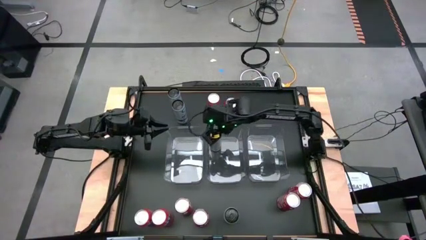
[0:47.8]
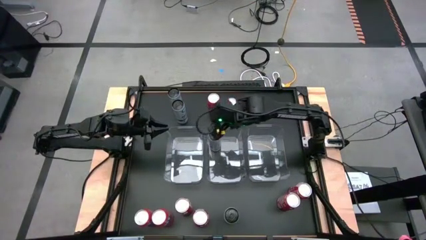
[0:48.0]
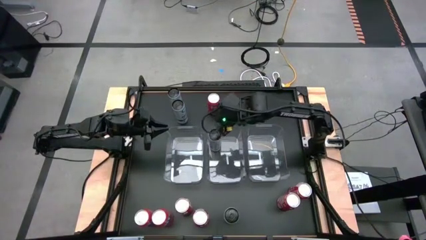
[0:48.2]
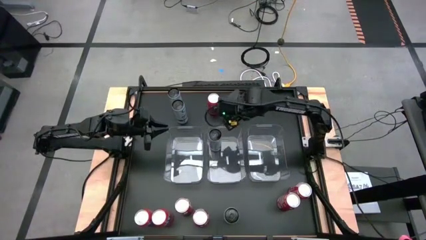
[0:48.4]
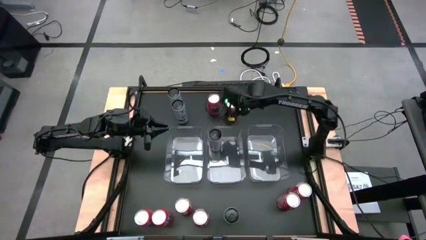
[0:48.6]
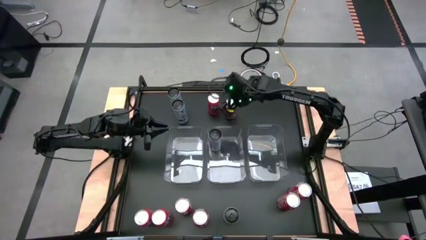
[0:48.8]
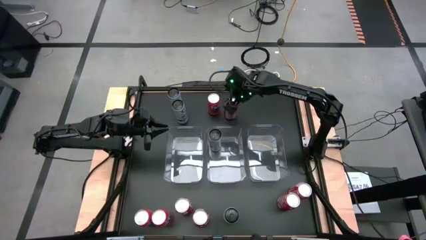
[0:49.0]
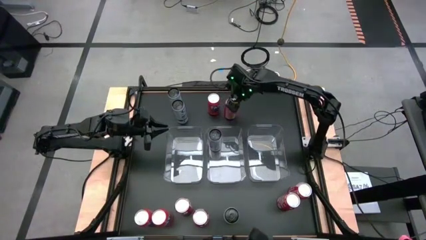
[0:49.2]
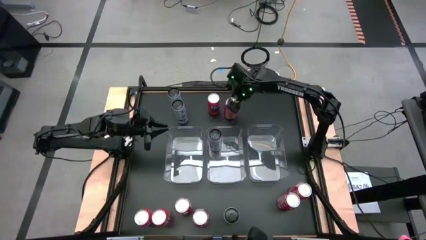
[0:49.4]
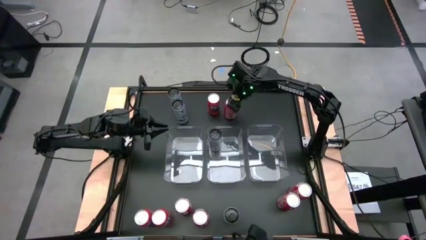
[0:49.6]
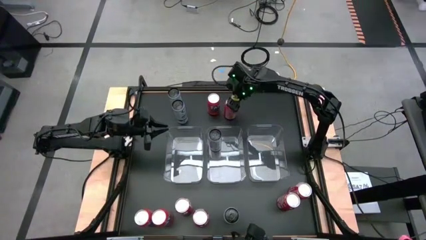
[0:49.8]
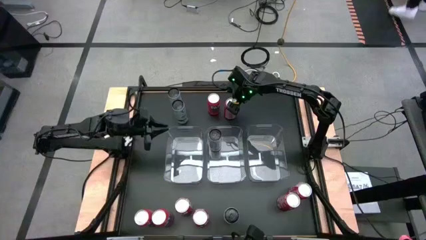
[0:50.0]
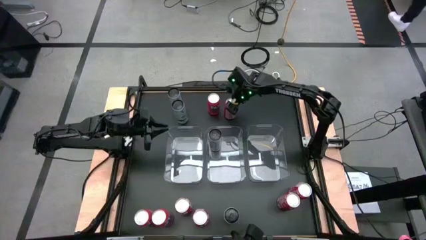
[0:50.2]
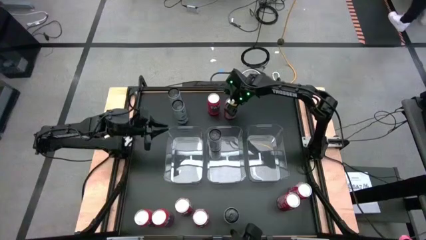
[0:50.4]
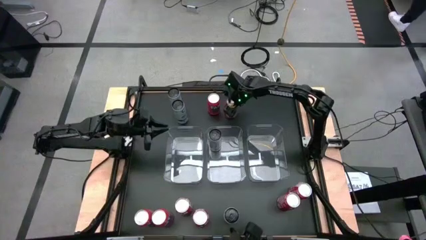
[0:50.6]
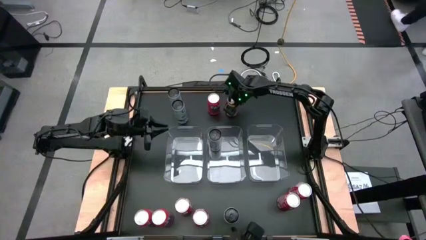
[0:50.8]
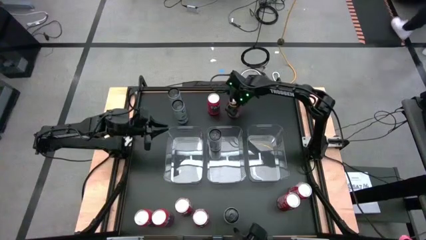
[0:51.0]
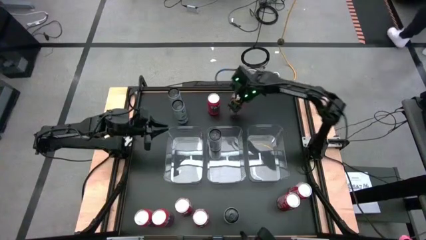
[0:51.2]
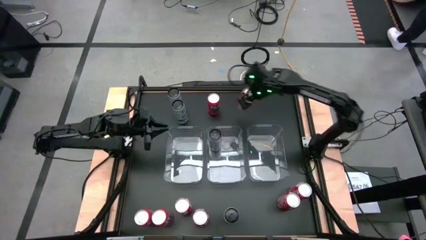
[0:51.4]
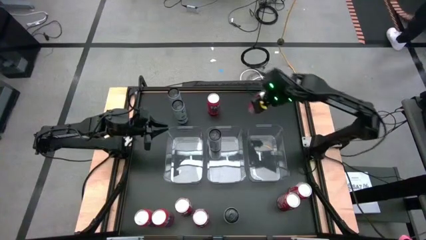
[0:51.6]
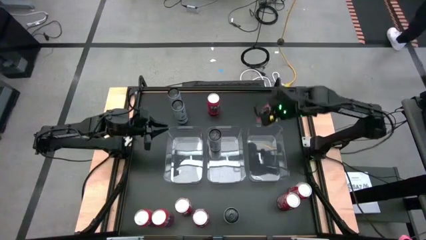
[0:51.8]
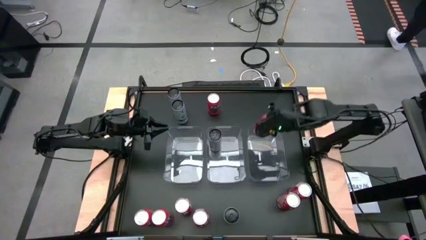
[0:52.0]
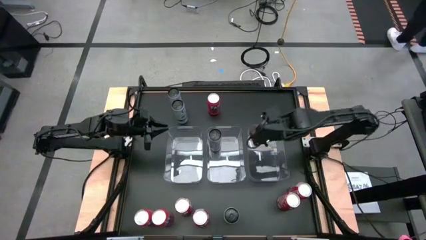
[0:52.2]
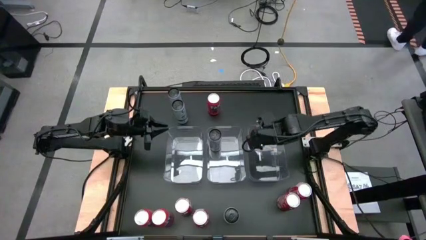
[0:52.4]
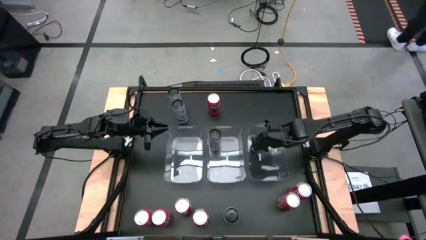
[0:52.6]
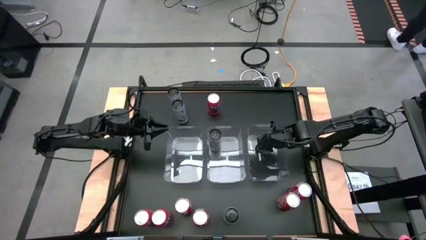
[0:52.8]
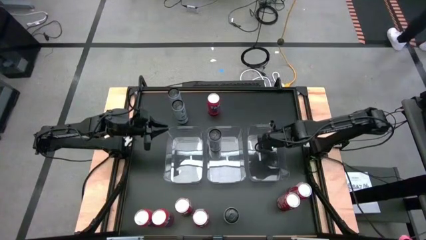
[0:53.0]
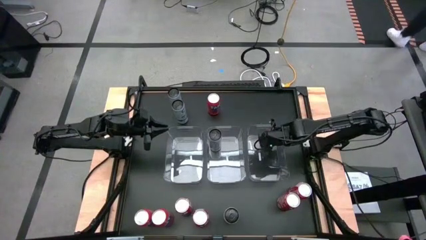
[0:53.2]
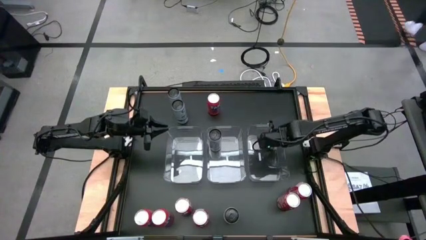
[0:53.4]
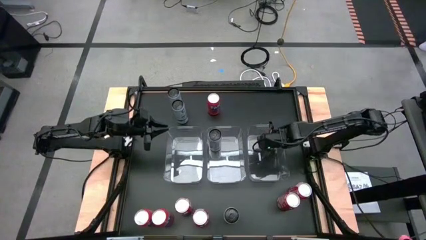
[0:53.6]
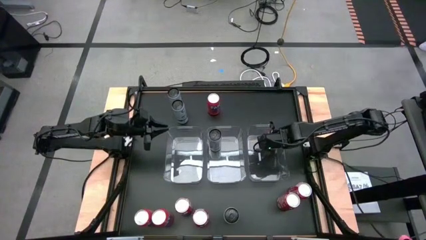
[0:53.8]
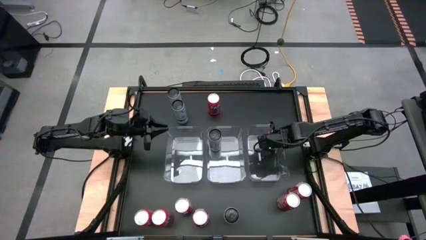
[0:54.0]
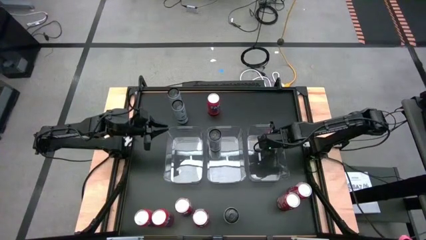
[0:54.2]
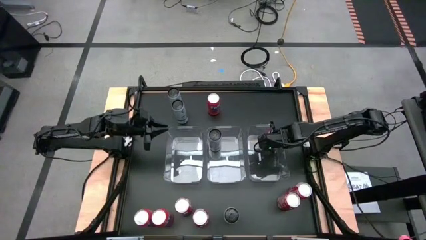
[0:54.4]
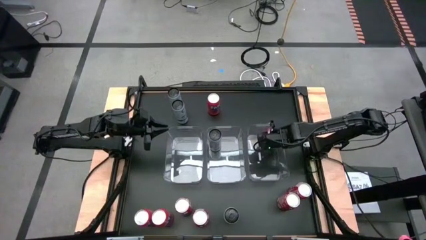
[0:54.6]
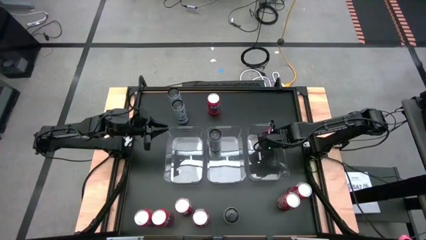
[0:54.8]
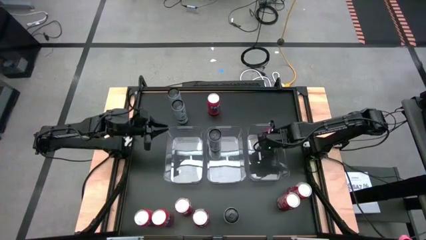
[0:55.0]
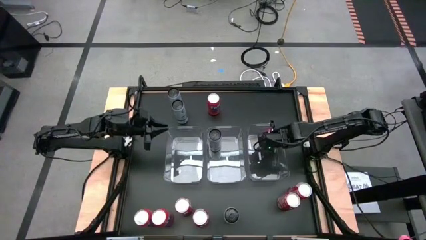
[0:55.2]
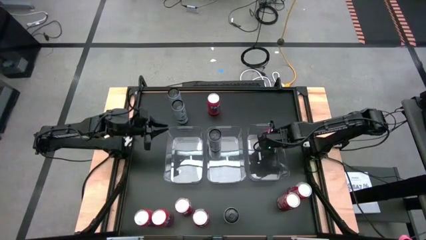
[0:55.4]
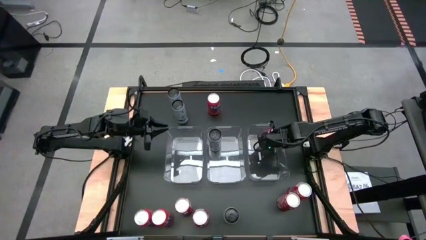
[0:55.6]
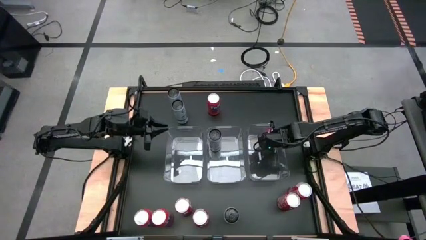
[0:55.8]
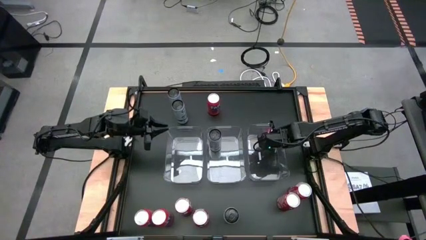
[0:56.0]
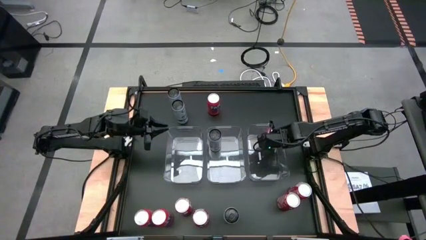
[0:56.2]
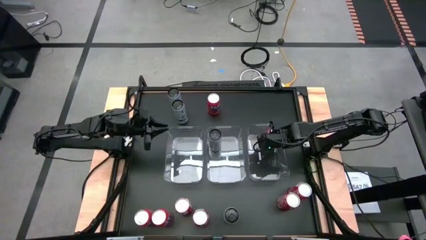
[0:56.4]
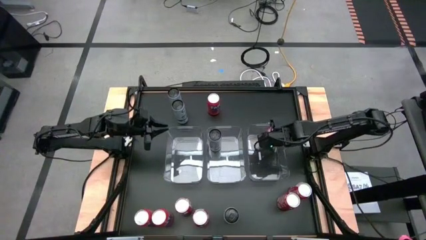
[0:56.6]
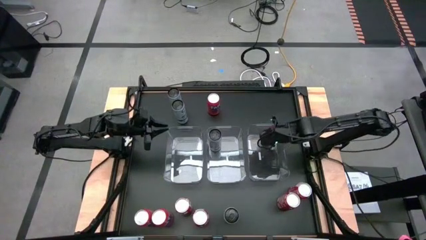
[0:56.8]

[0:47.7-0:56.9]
Task: Sort soda cans
Put the top right orange soda can into the right transparent bin

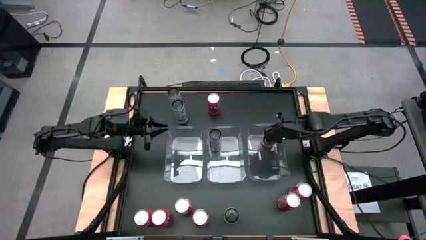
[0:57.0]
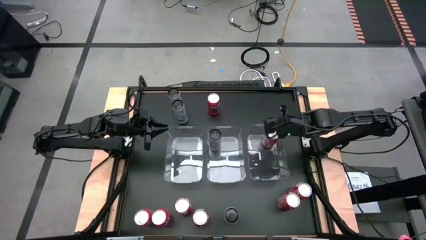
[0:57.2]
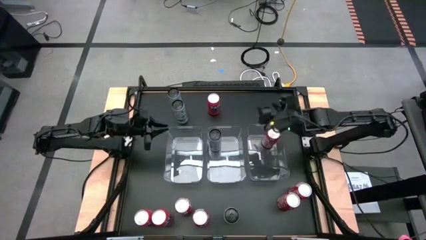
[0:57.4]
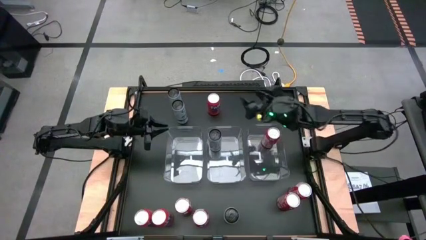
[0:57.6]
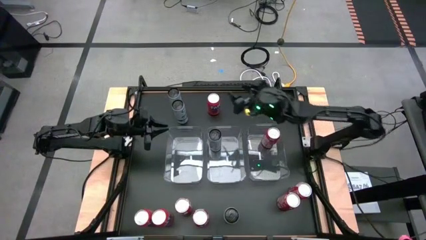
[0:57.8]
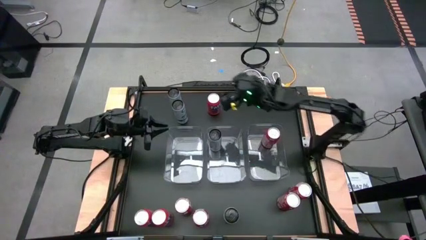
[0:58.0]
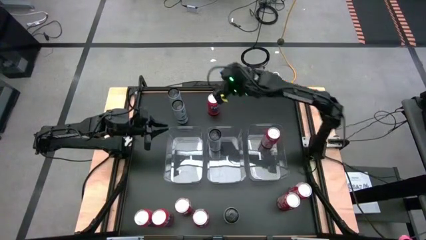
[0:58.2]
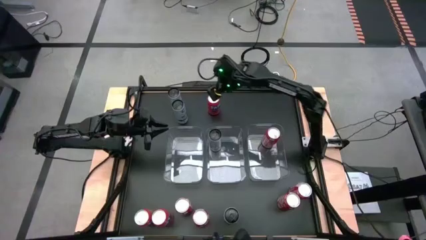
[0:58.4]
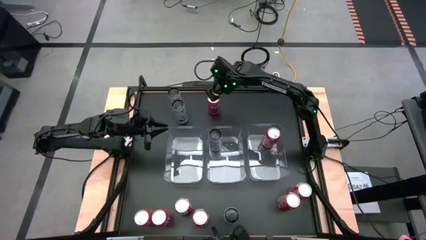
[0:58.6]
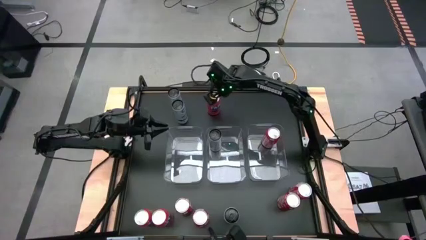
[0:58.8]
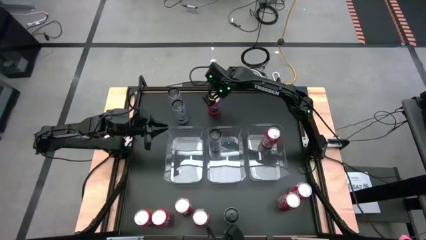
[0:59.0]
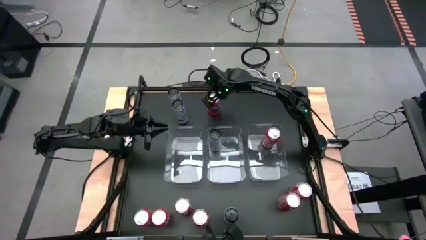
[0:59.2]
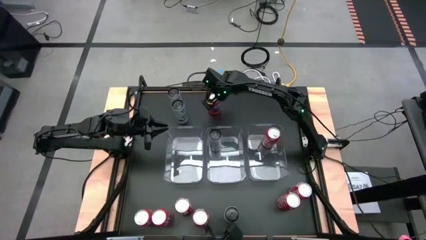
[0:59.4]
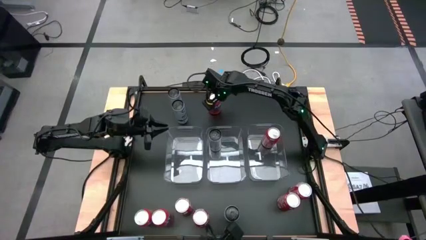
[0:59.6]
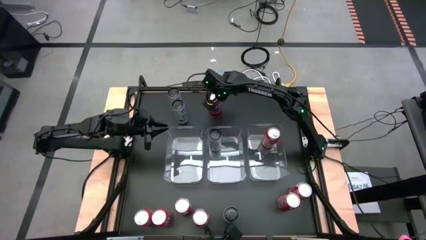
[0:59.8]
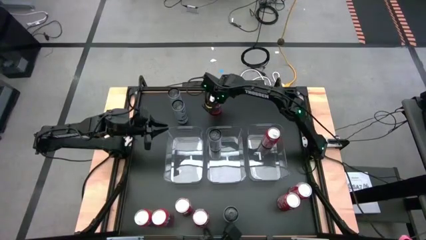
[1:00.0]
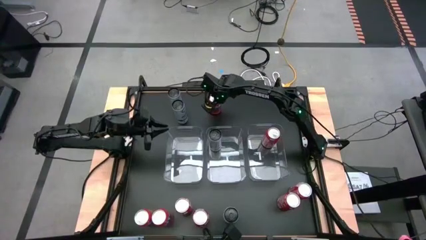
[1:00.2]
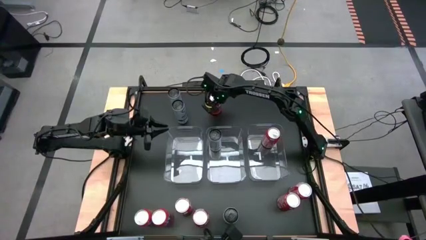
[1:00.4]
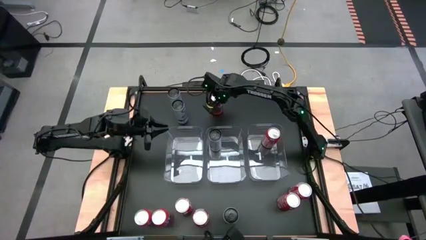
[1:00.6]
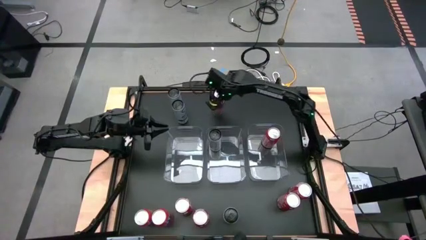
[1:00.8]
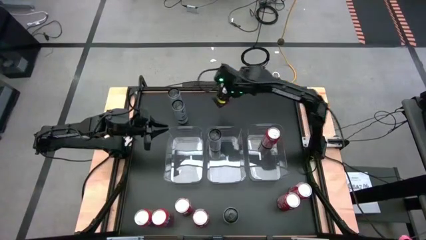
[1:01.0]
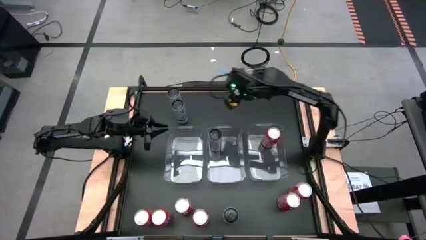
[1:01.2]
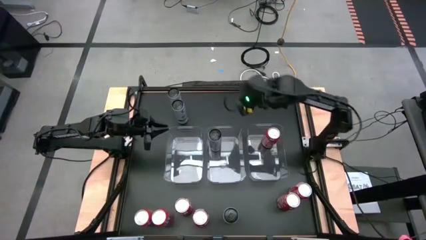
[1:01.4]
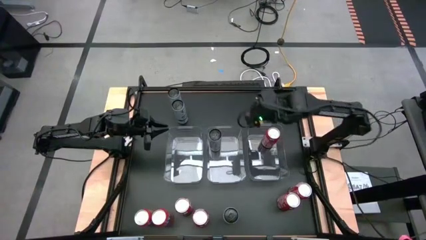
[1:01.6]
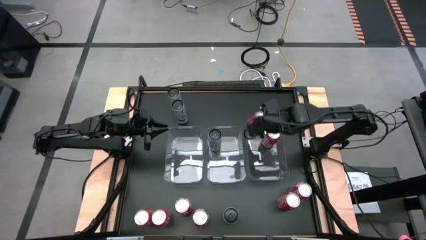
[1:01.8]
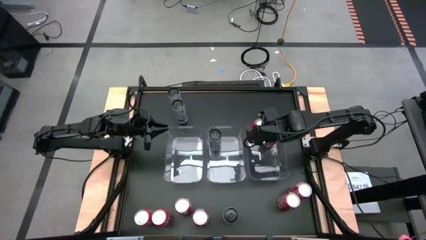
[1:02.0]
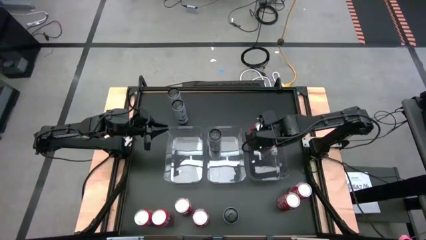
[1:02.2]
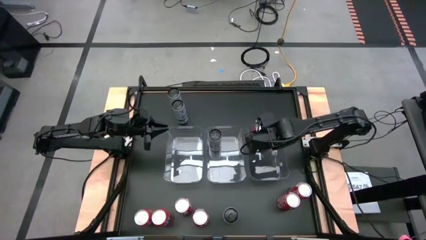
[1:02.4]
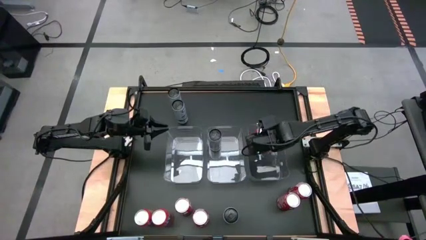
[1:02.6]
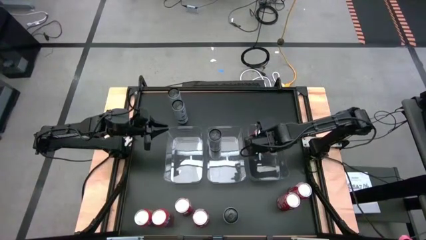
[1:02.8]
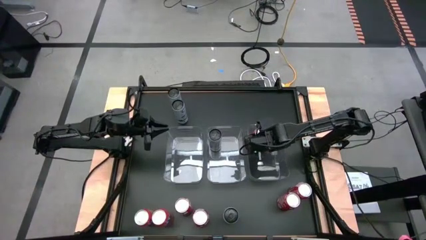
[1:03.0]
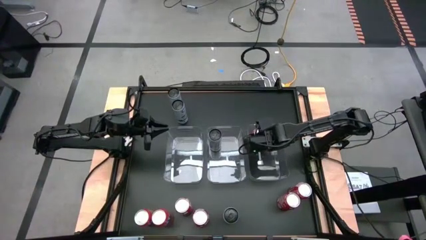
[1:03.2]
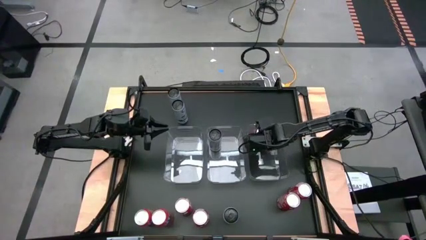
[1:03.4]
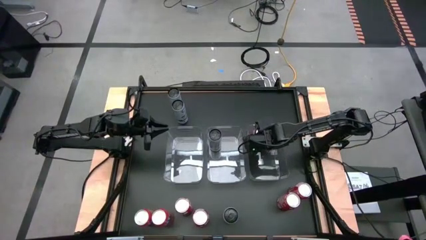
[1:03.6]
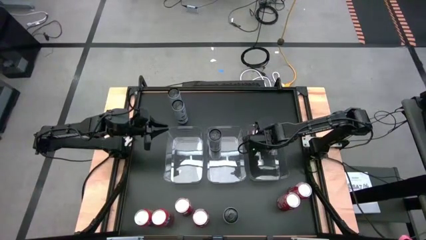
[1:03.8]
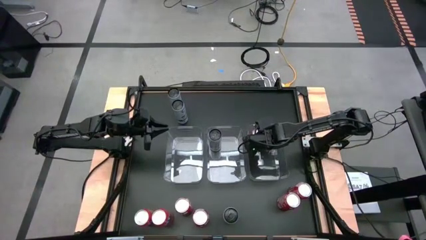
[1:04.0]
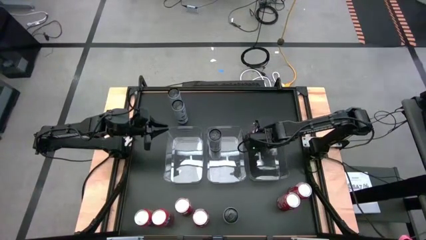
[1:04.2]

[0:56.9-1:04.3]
Put the top orange soda can into the right transparent bin
